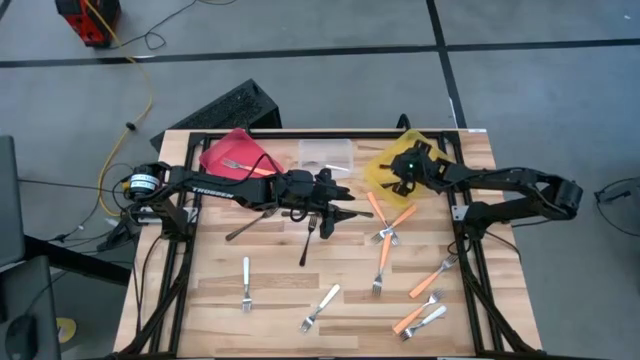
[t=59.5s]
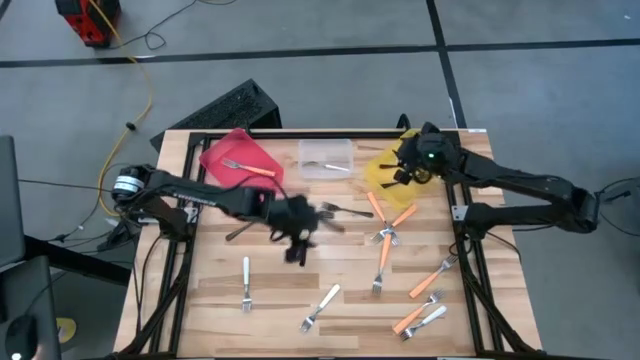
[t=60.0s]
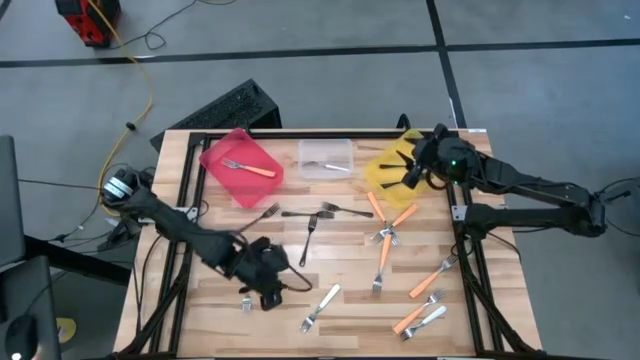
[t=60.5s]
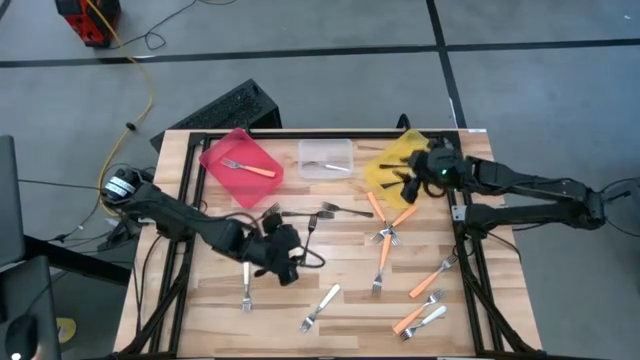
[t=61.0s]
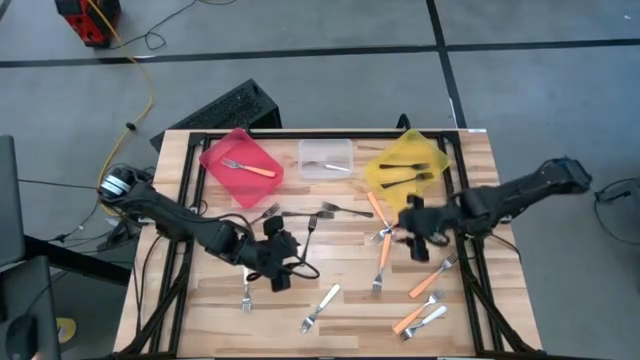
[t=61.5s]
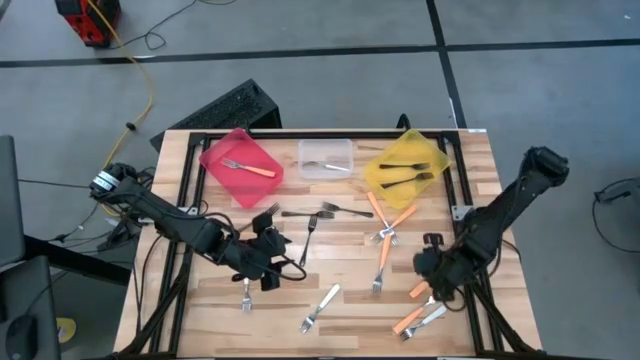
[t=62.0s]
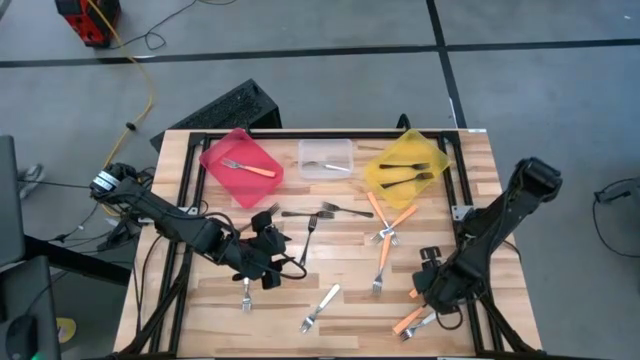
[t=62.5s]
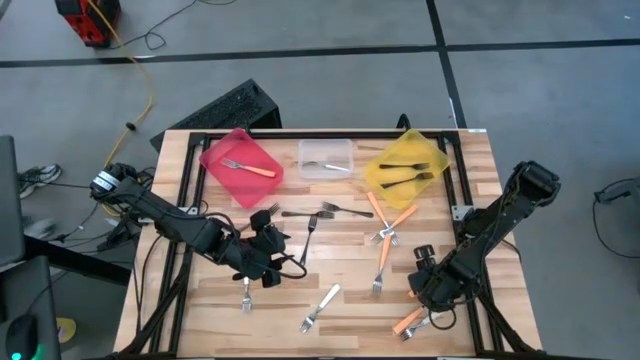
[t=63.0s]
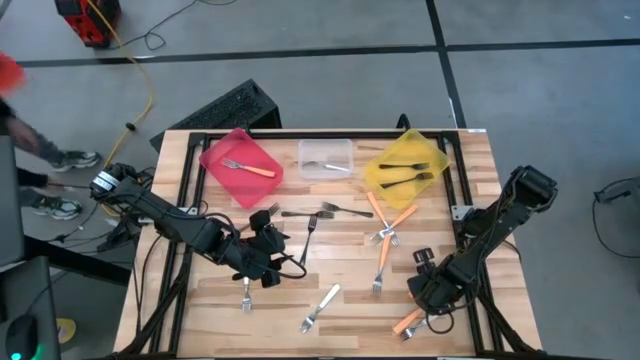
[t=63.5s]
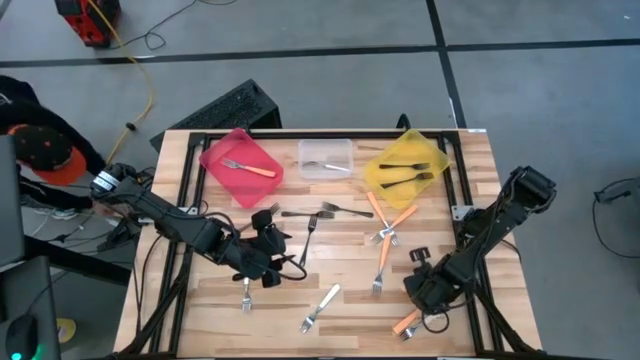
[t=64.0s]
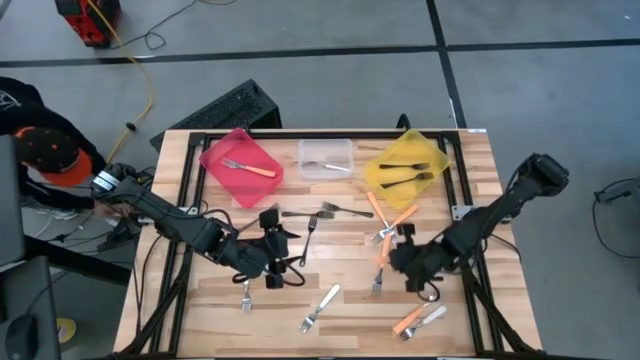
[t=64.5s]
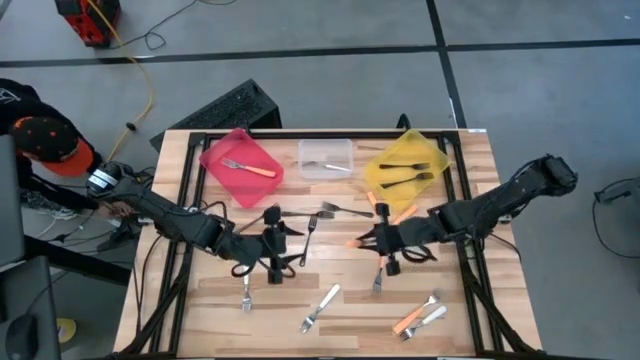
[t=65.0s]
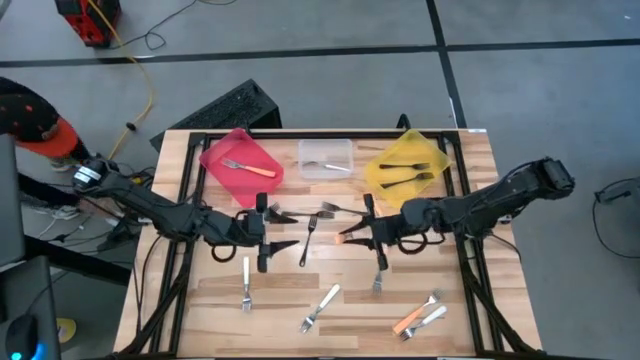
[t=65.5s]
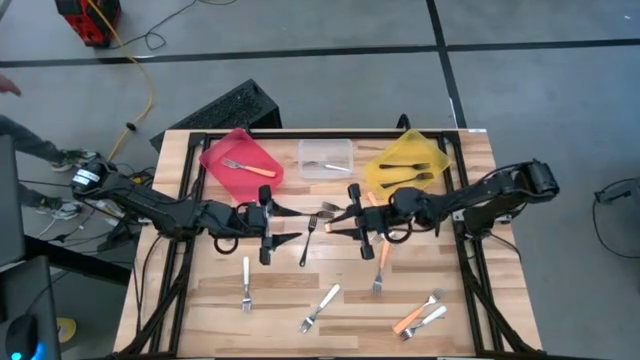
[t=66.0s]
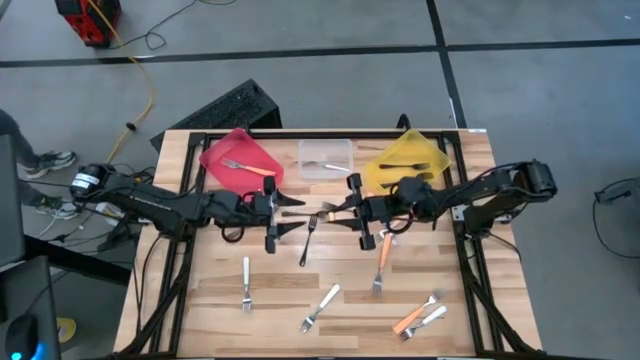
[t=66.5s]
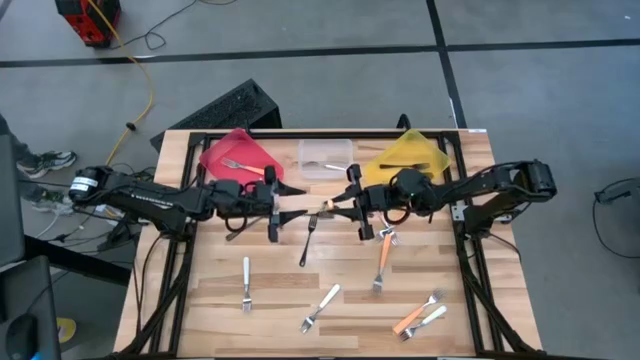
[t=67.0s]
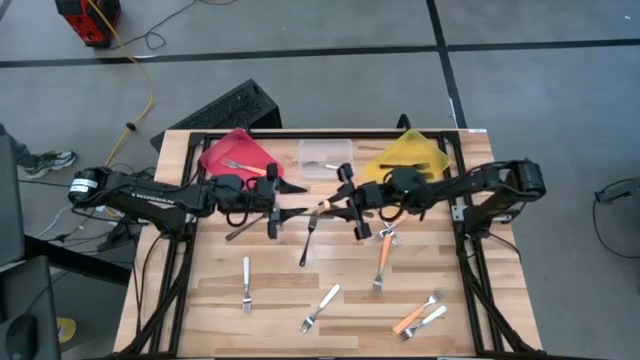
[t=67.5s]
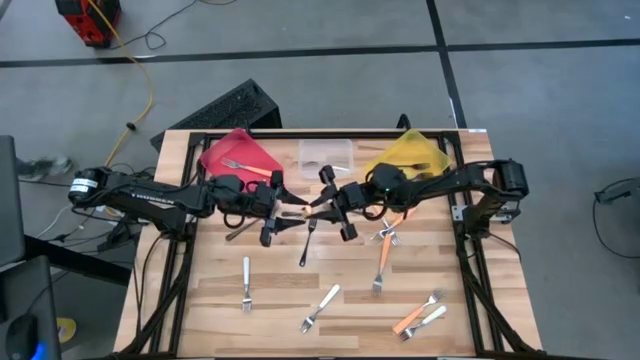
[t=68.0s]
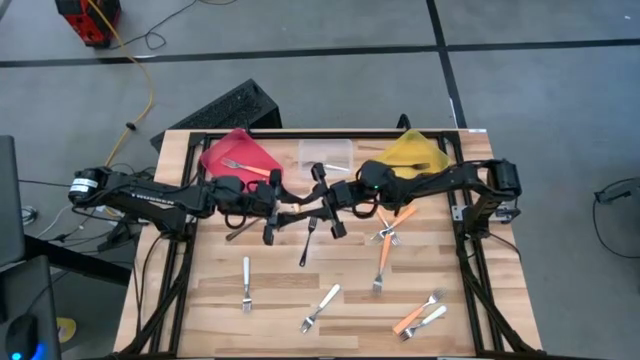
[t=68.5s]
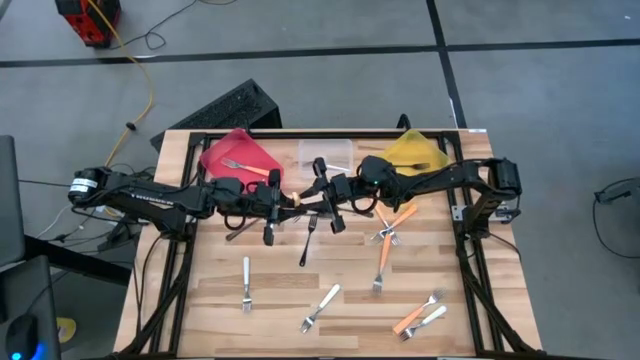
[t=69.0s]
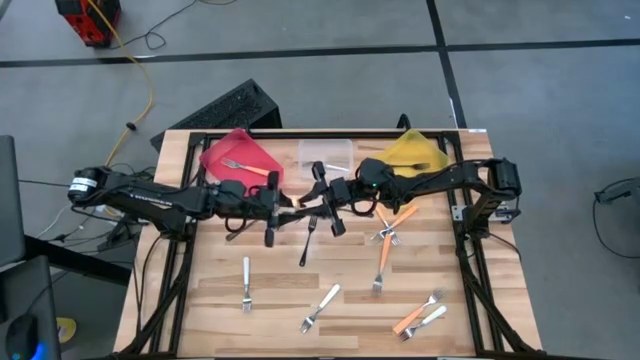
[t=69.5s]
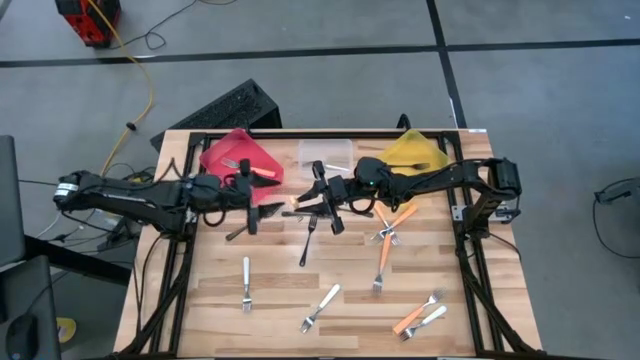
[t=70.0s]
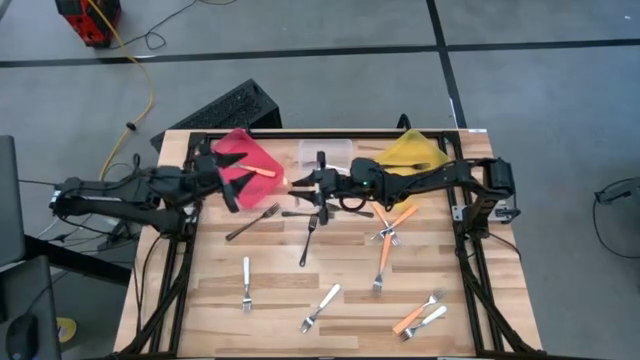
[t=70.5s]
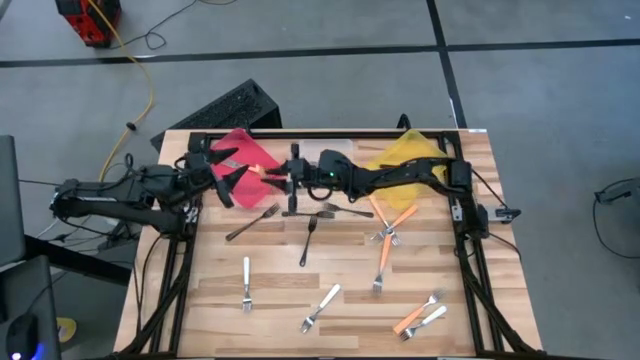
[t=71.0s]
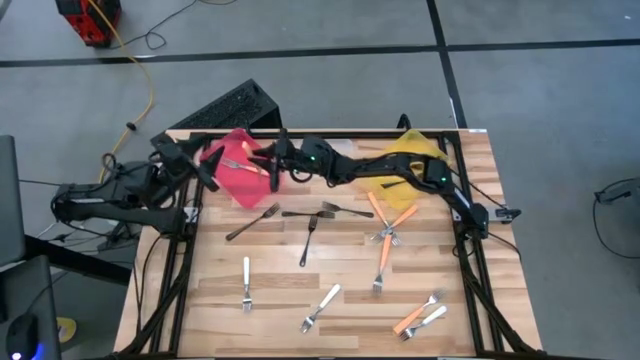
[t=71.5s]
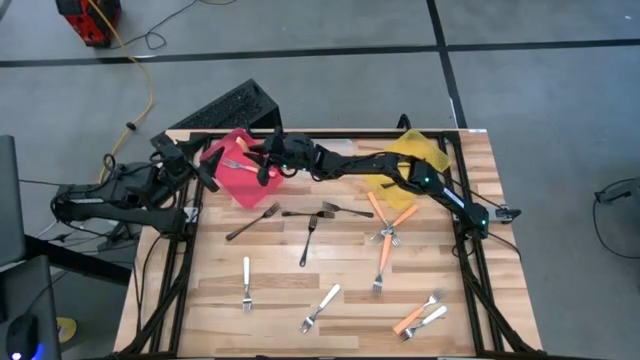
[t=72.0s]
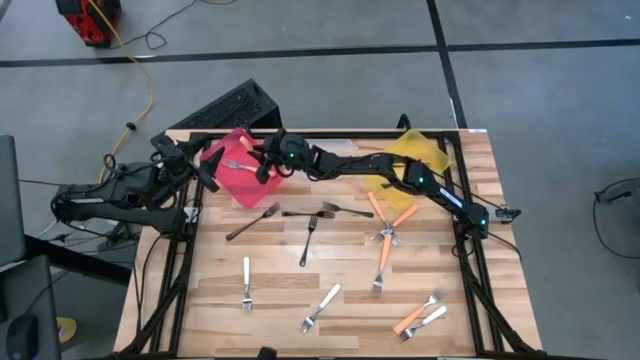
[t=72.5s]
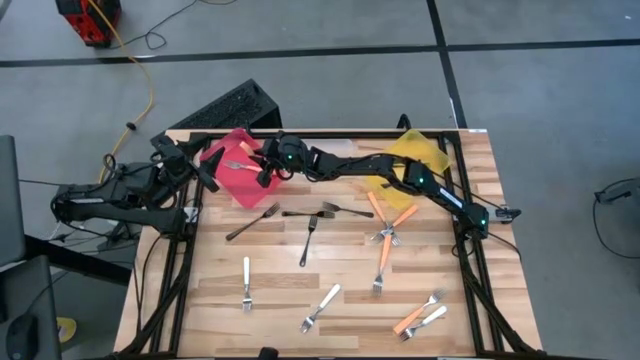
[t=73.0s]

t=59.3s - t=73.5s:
Task: Sort silverware by color (type)
Put the orange fork into the red bin

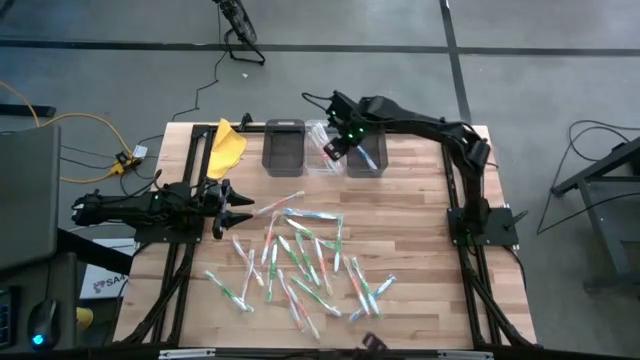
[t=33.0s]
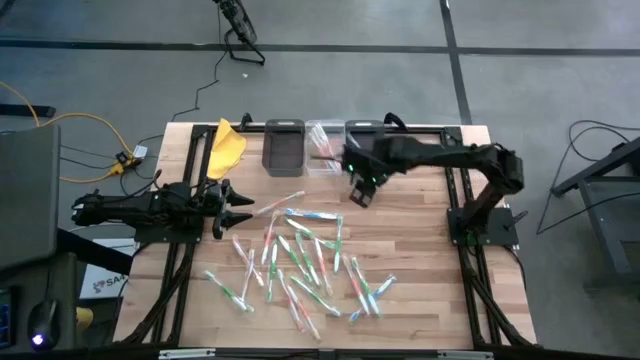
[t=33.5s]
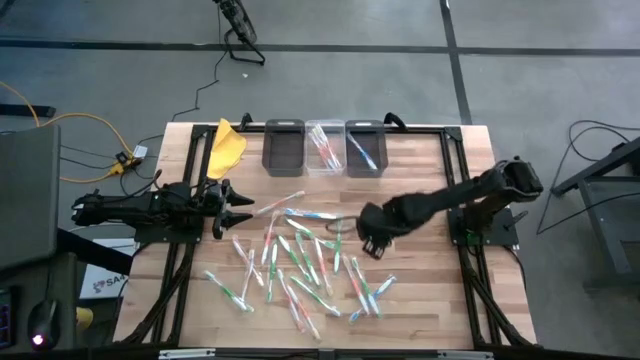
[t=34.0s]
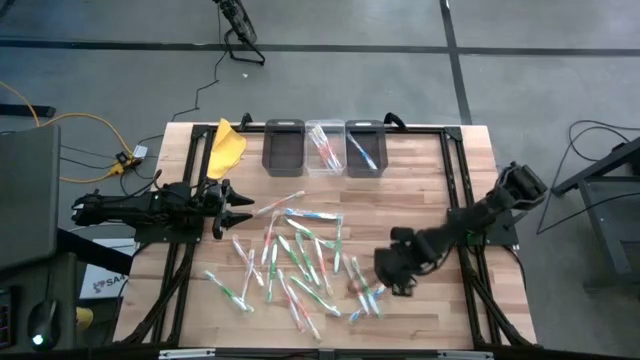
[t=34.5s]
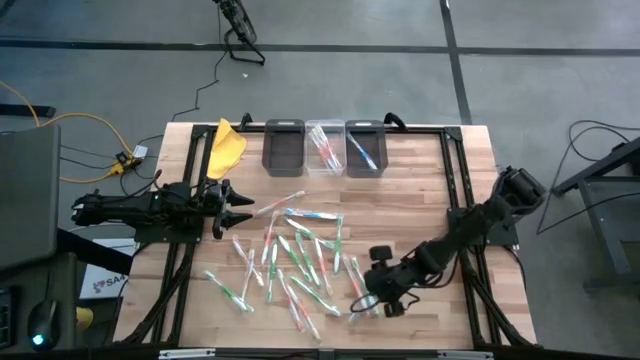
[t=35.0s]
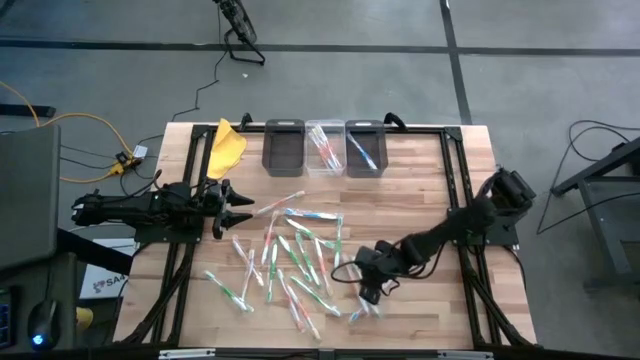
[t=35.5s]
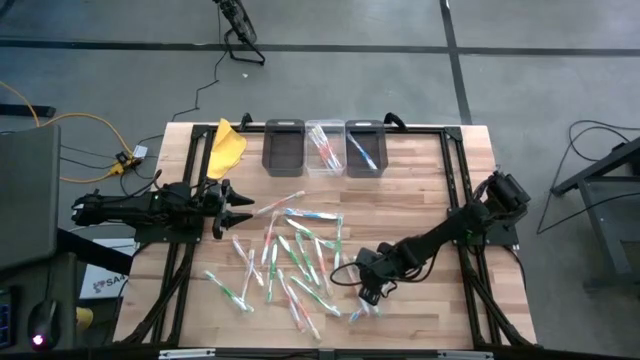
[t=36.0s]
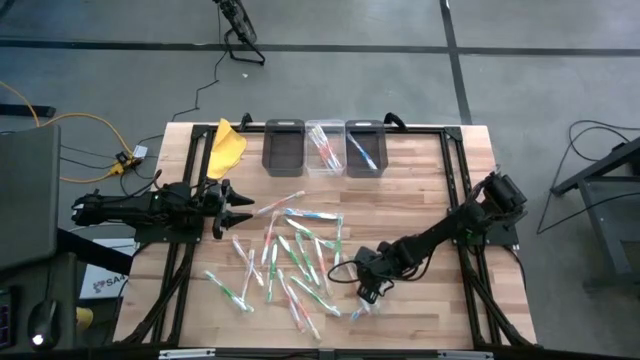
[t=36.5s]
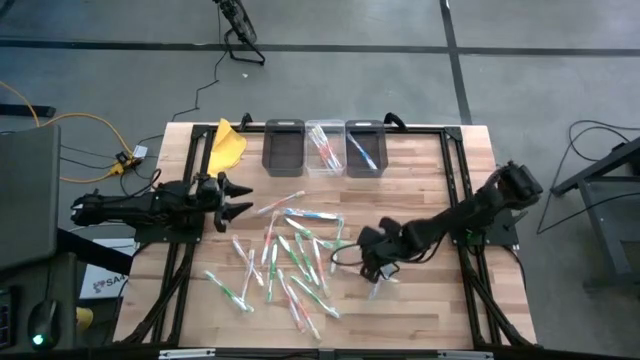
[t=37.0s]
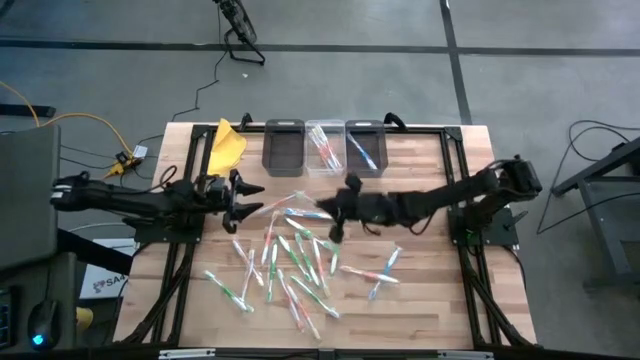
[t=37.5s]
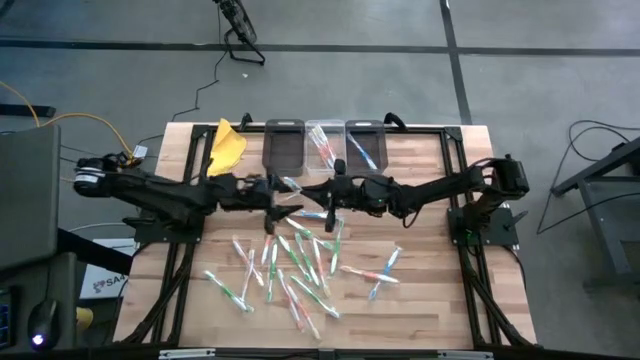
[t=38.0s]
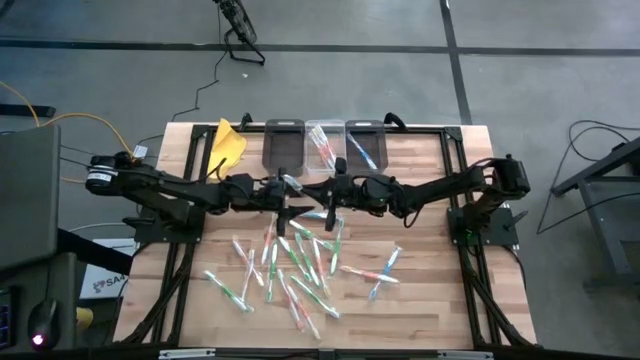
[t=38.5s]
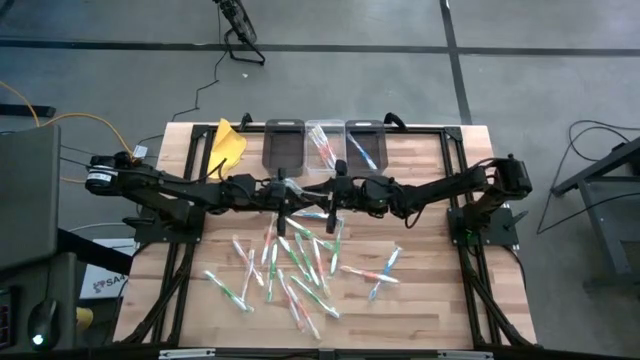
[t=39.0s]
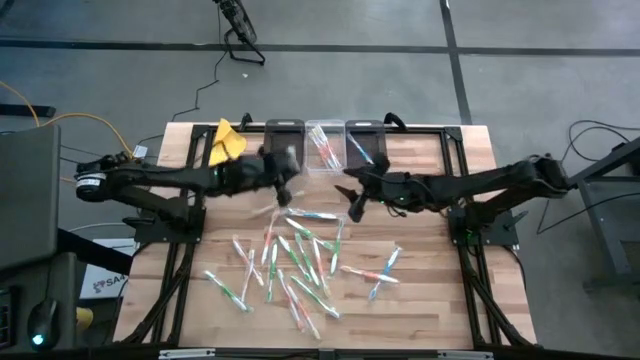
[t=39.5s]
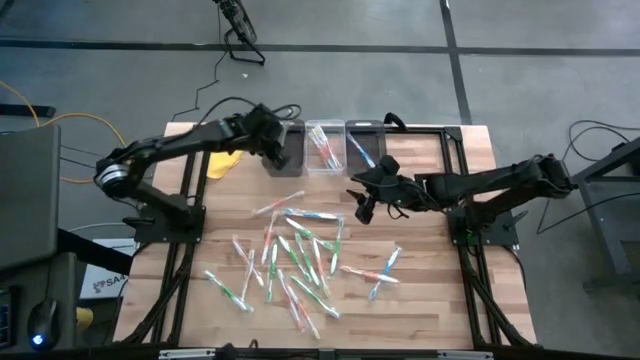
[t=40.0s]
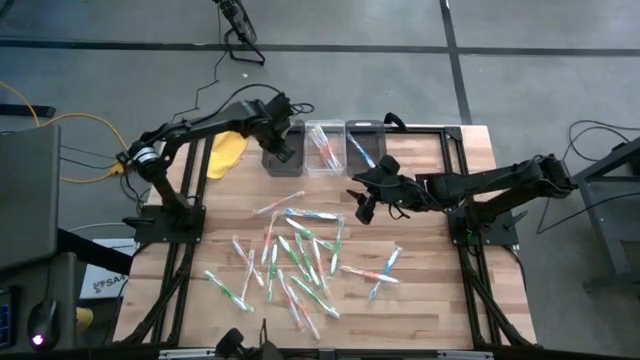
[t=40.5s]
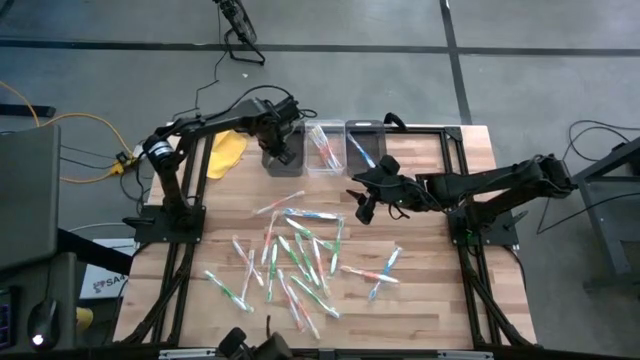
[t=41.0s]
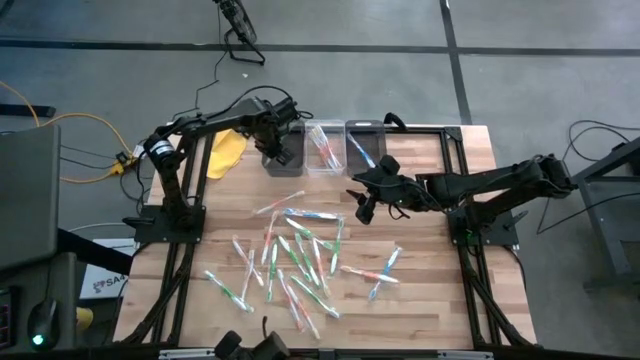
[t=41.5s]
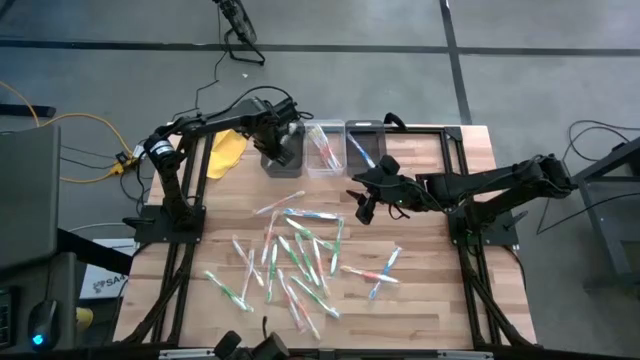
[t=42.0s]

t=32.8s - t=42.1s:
Task: Pick & Place Toothbrushes
Put the green toothbrush into the left black bin
